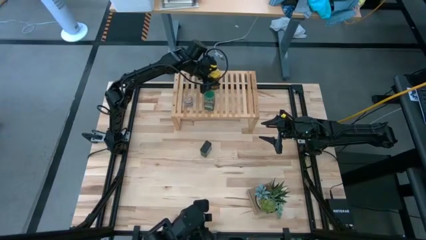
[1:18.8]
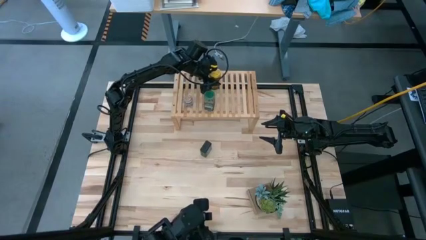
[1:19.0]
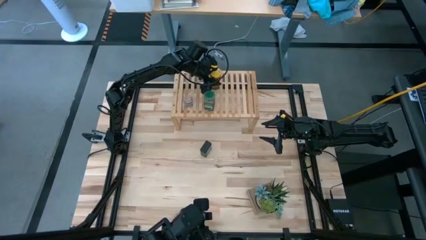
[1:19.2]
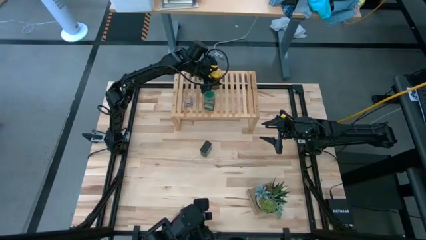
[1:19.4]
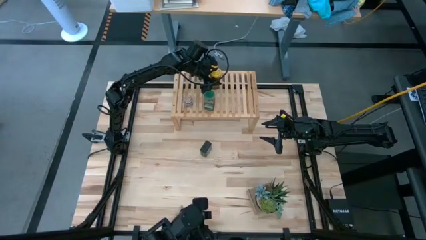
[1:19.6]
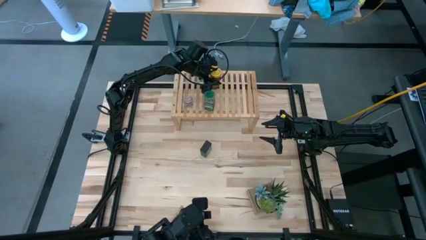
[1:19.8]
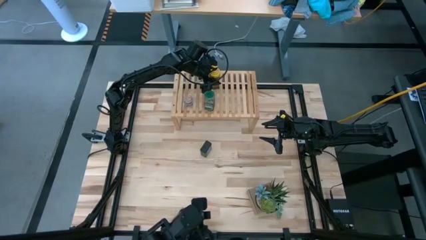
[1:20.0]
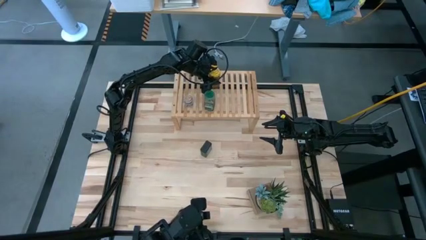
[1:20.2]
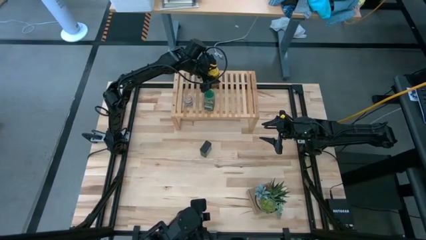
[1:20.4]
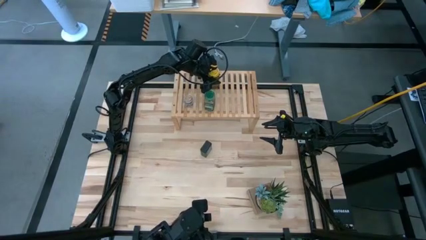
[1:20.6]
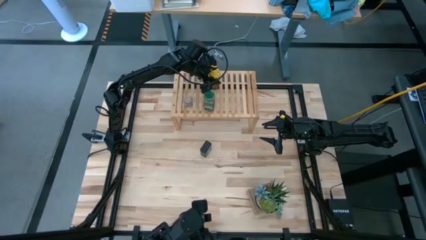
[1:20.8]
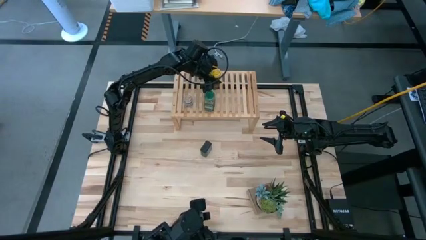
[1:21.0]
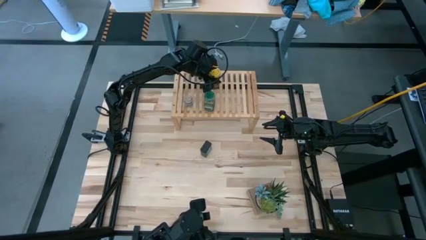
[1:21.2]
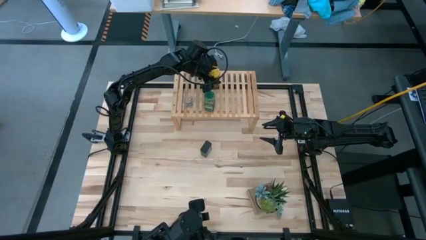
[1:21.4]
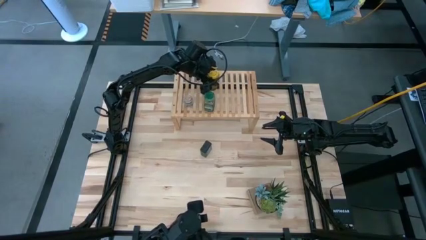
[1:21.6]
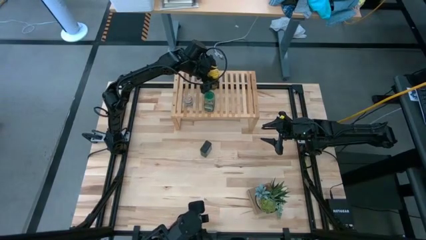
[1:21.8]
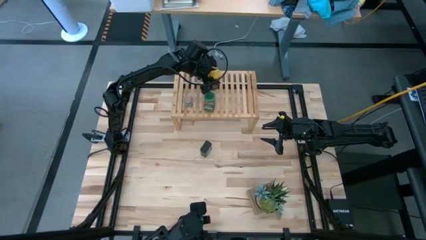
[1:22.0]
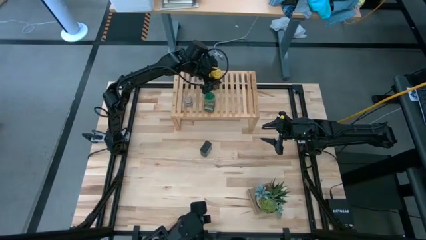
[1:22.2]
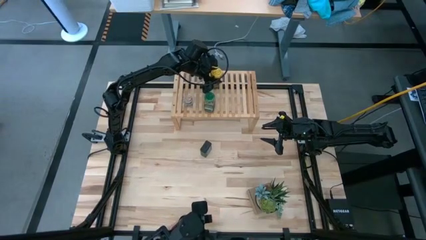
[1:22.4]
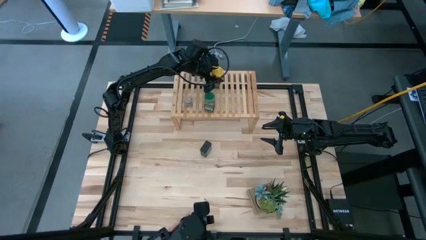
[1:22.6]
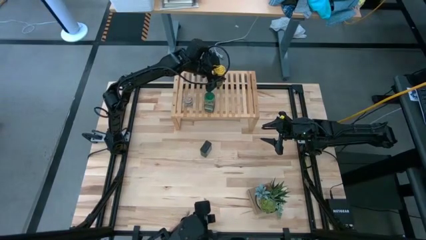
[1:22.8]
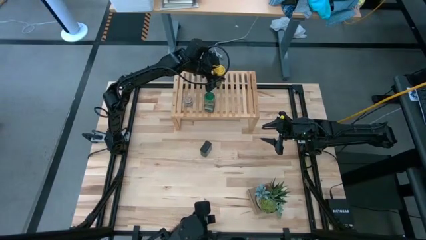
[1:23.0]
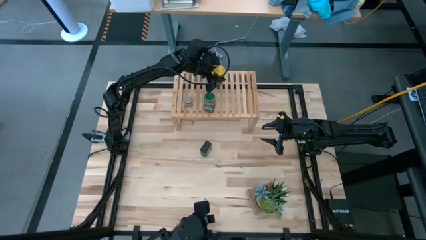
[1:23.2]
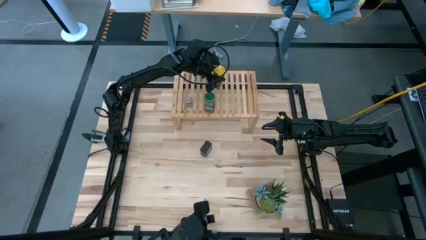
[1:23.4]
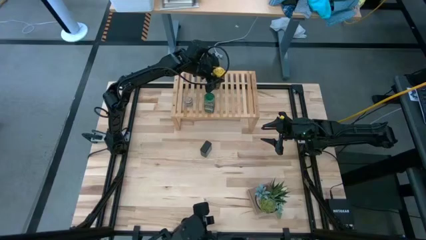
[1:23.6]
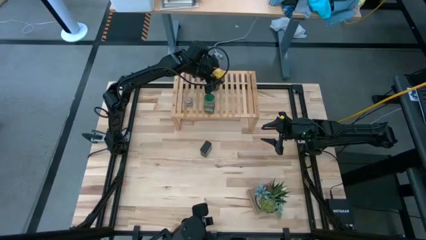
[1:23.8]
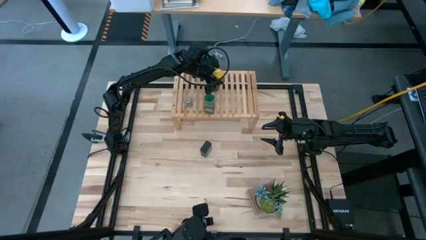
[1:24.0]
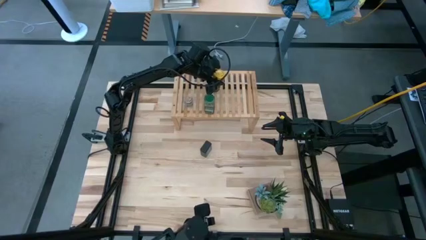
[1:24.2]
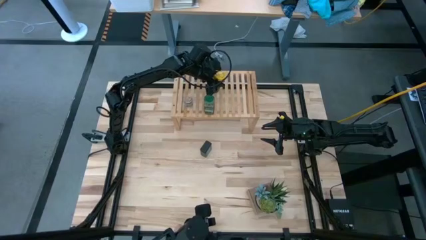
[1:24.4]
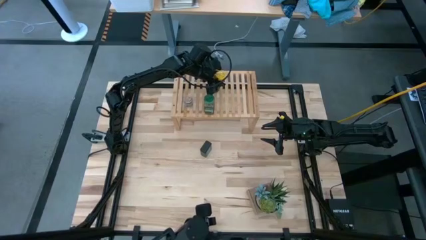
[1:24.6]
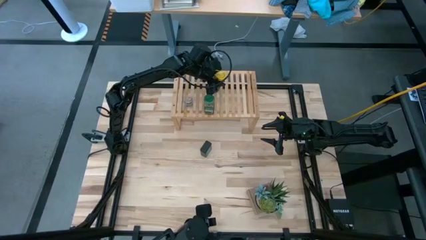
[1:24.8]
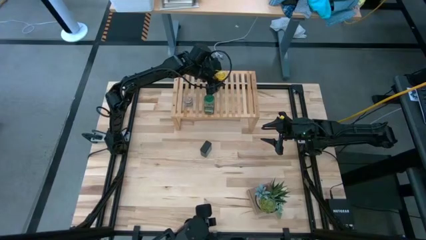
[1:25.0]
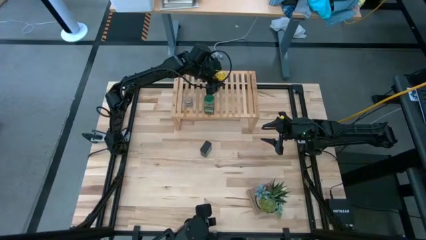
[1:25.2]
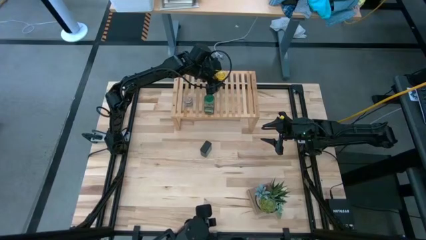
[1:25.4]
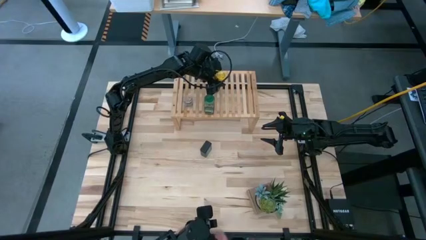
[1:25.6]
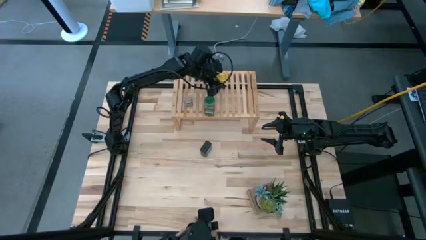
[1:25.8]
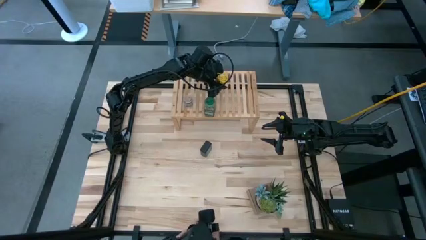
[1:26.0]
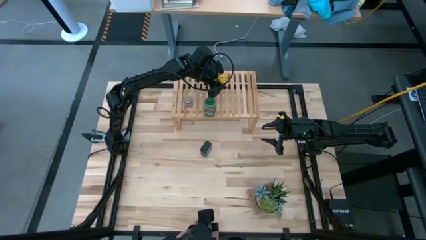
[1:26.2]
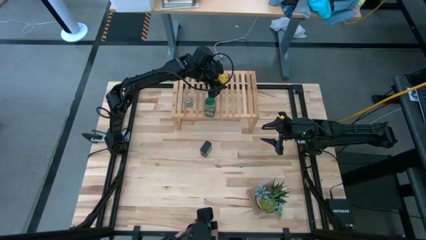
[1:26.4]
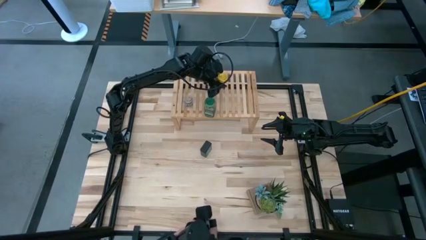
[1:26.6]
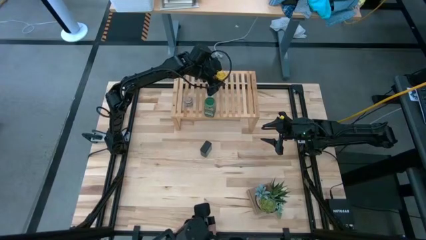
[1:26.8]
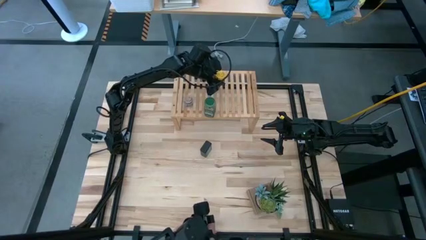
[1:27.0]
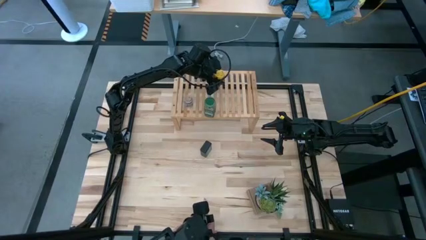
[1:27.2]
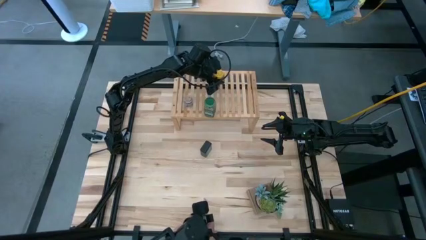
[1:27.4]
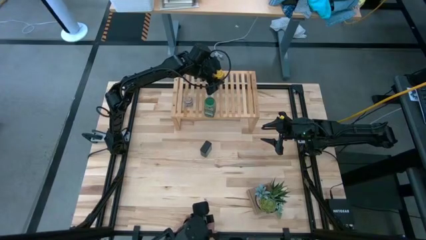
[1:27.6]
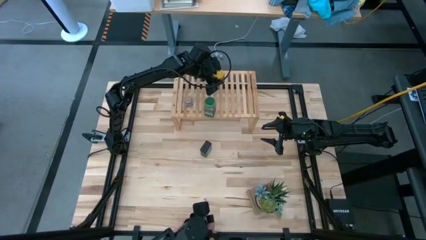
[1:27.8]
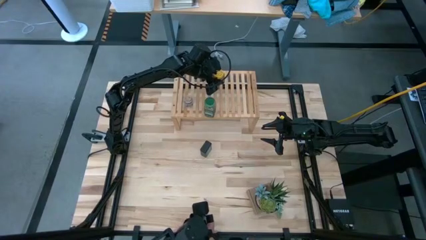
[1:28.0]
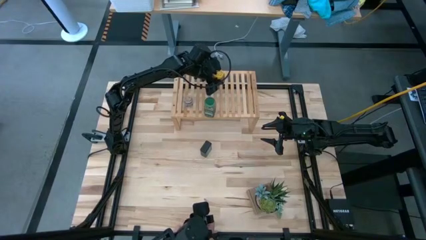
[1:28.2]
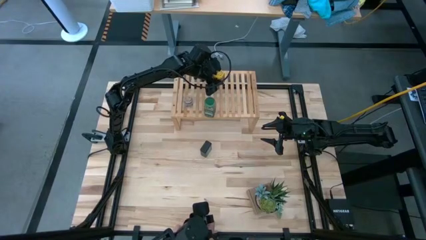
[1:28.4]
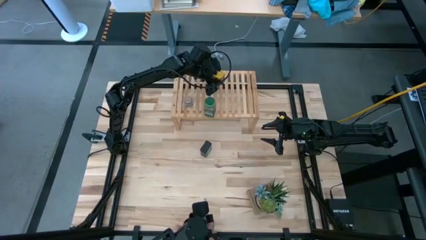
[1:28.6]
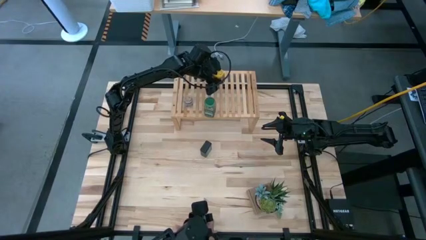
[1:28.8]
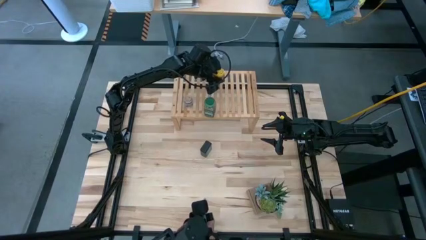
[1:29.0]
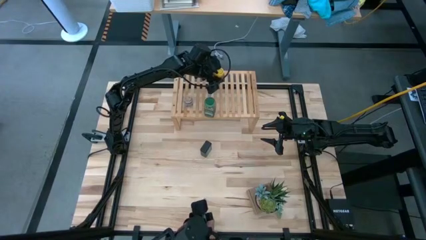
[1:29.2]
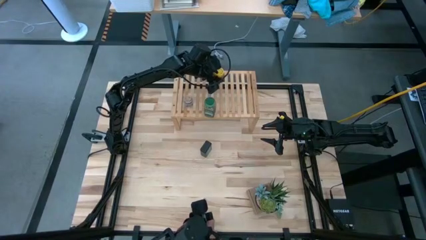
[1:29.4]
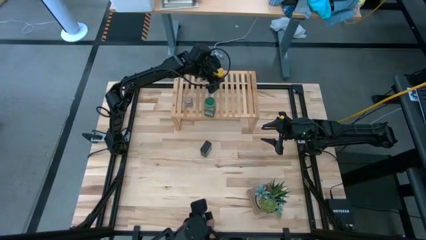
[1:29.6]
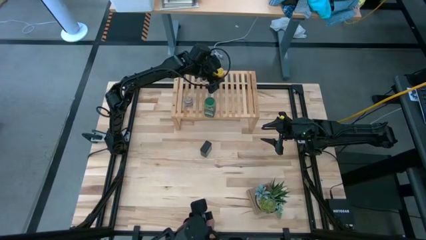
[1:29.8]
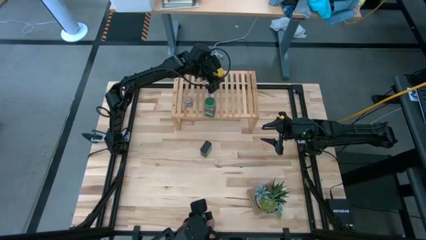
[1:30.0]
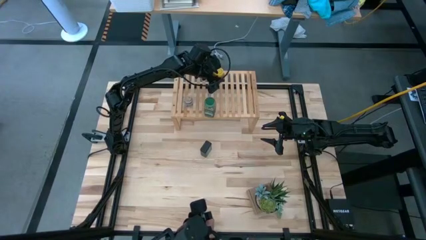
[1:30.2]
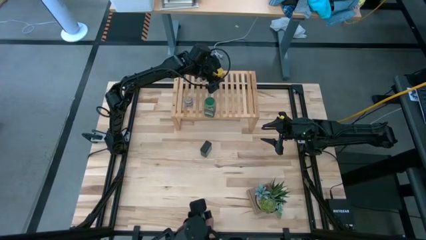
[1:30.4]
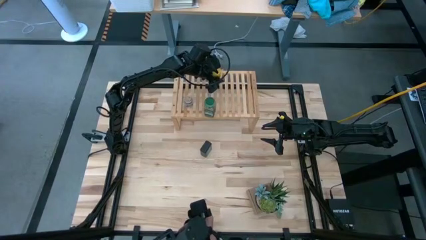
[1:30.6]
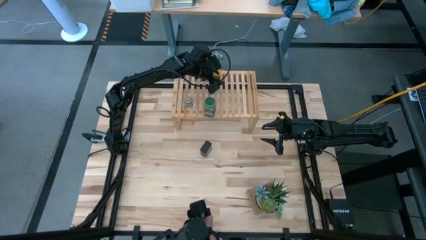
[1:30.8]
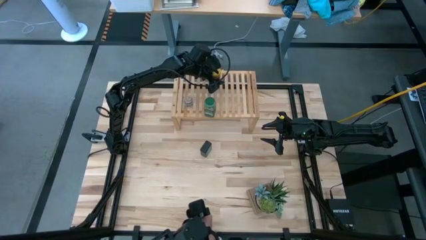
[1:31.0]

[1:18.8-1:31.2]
Task: Shelf spices
Put the yellow seasoning bottle on the shelf

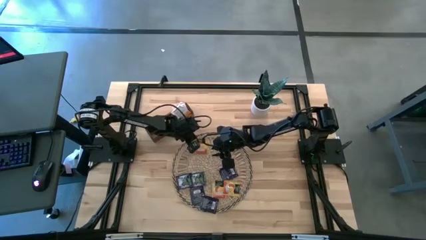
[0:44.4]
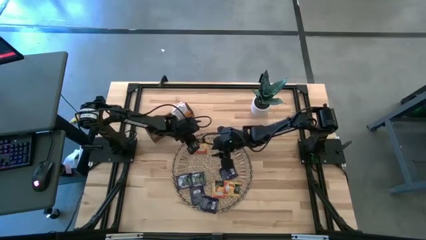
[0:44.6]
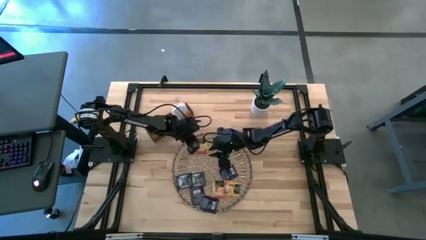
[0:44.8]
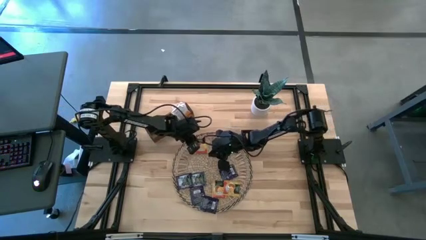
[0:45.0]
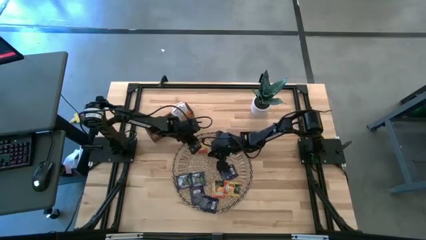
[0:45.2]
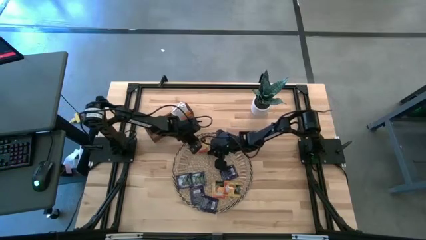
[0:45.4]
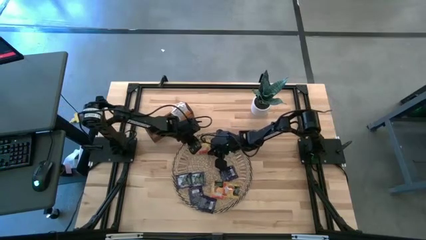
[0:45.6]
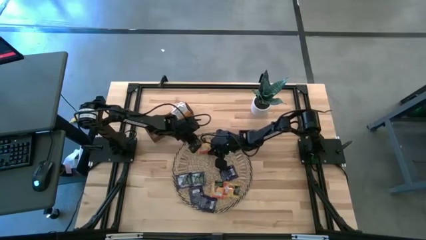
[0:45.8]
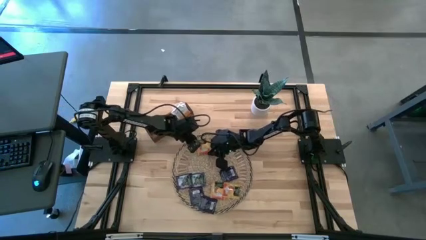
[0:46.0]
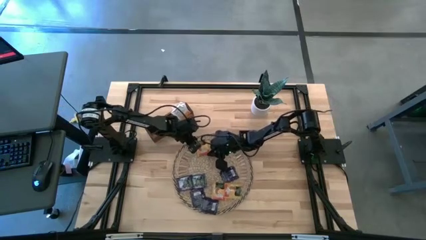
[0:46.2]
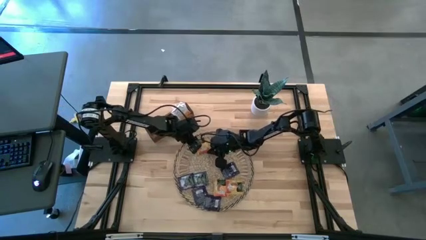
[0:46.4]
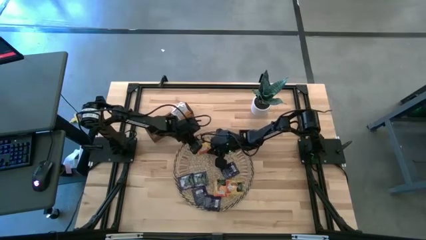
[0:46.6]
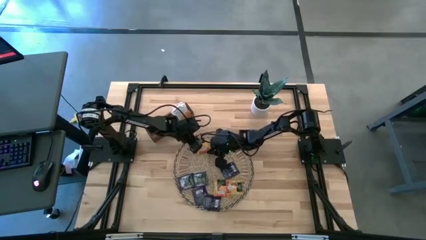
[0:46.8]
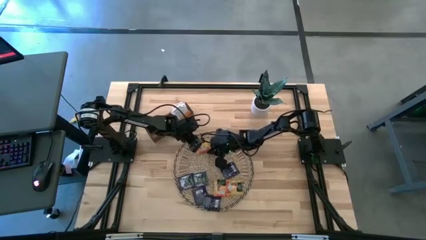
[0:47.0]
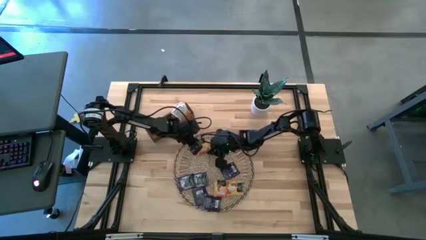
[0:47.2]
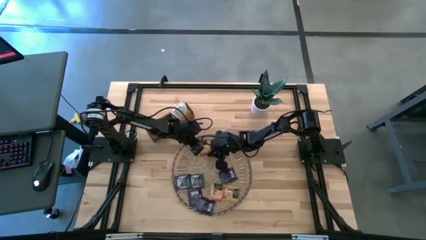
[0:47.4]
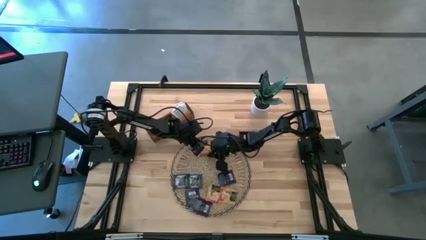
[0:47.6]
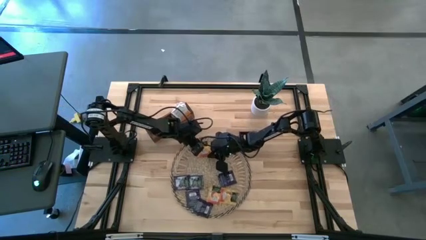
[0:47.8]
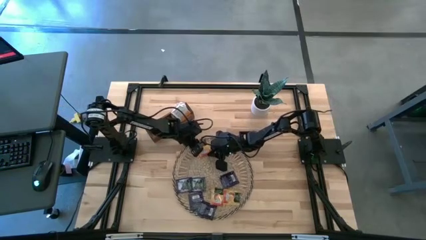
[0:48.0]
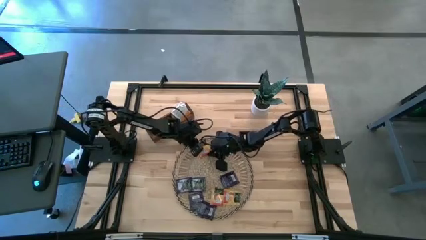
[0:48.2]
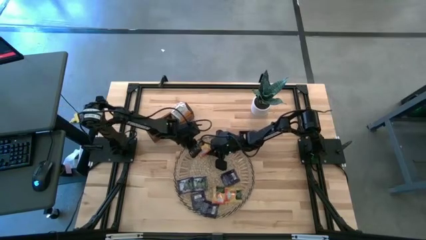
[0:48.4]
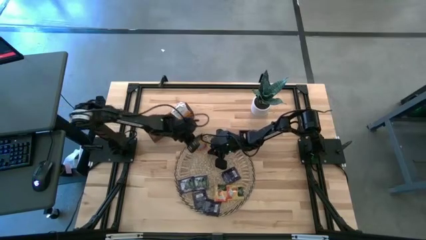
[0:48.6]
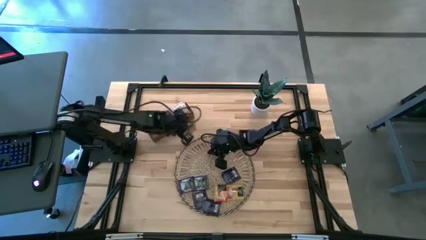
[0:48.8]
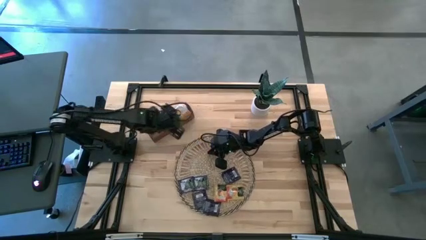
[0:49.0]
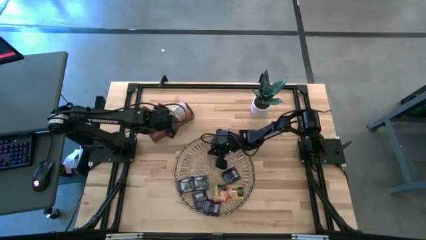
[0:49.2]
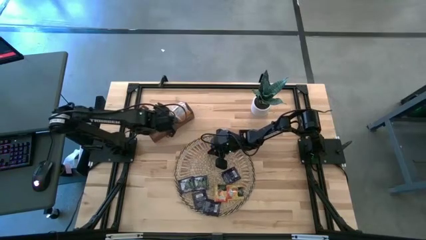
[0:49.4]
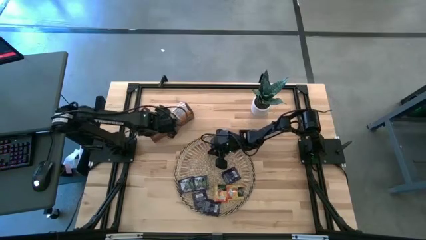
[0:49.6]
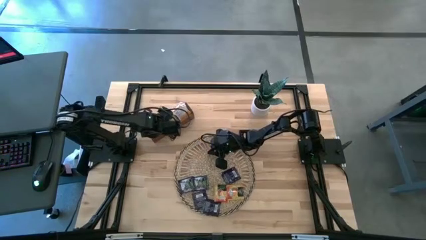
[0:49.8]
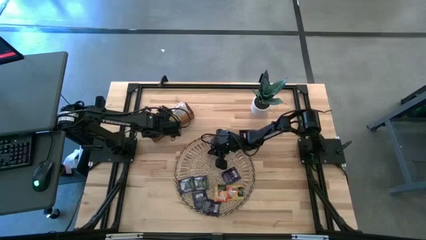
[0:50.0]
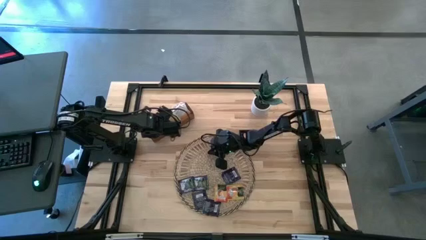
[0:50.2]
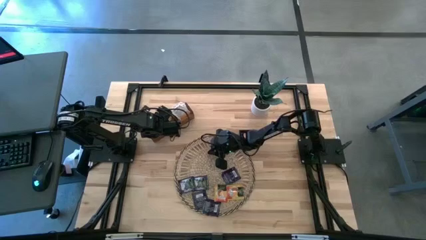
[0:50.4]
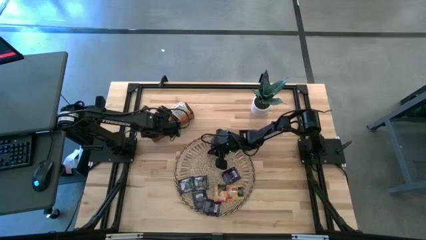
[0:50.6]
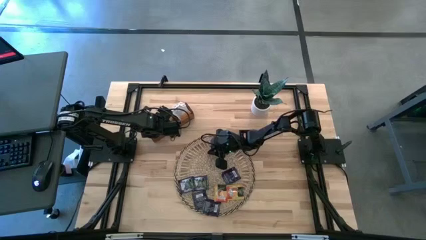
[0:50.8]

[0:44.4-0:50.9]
Task: Pick & Place Tea
Put the top left orange tea bag into the middle compartment of the wooden organizer
